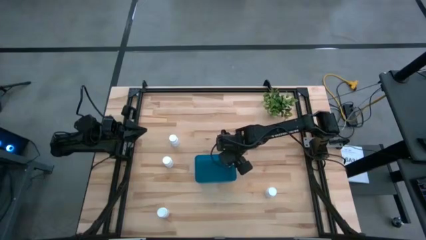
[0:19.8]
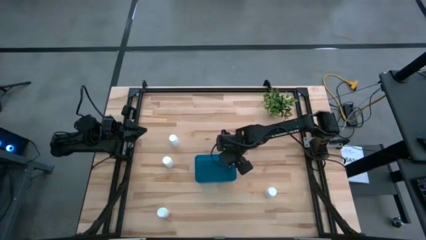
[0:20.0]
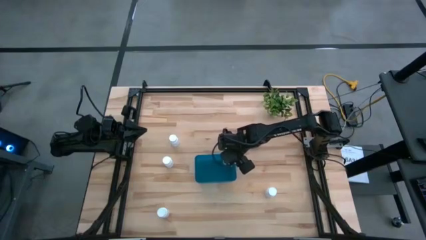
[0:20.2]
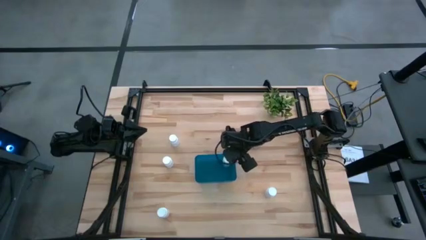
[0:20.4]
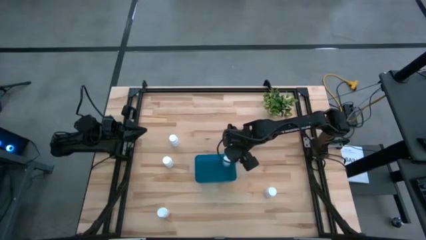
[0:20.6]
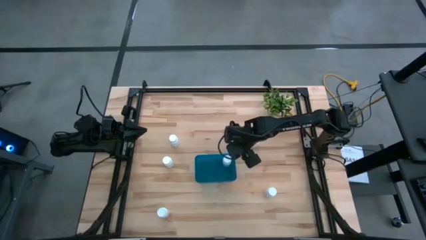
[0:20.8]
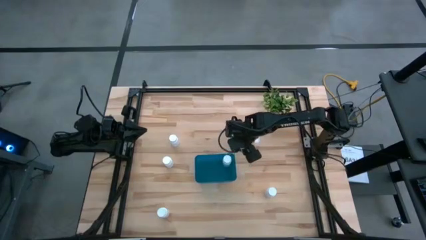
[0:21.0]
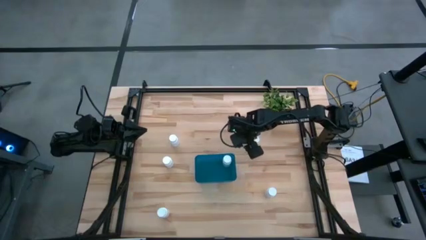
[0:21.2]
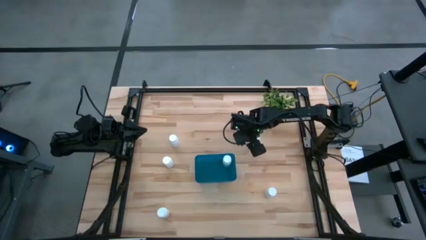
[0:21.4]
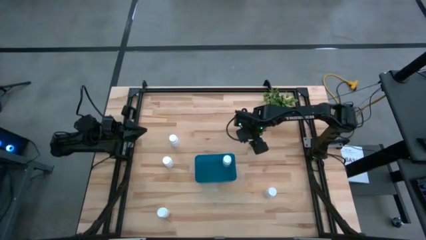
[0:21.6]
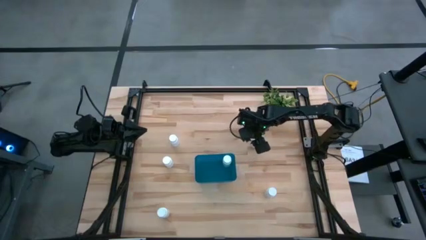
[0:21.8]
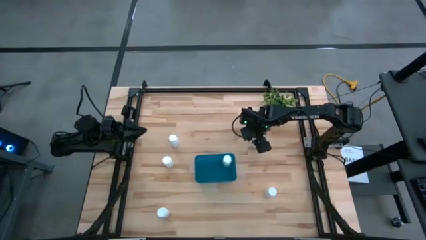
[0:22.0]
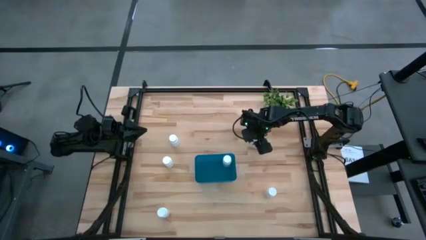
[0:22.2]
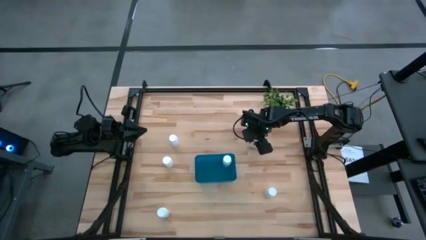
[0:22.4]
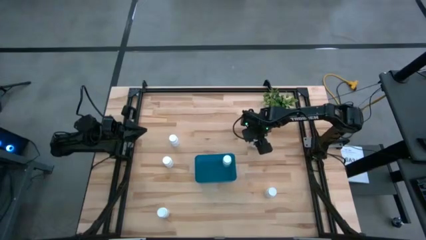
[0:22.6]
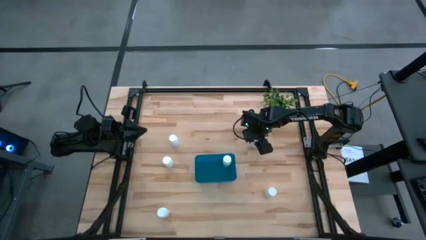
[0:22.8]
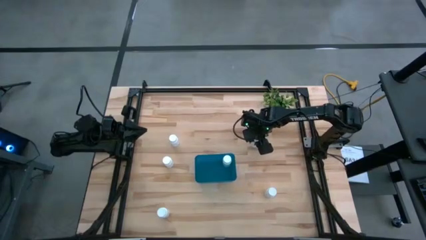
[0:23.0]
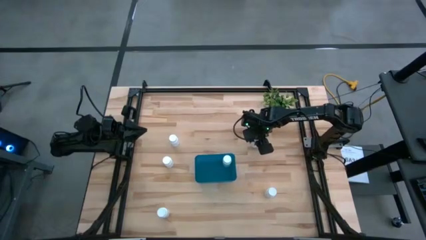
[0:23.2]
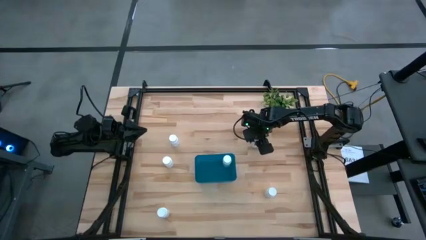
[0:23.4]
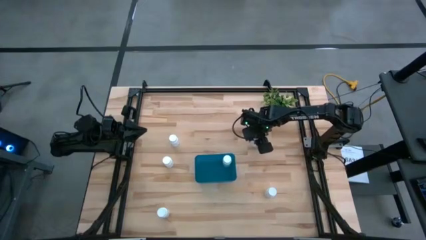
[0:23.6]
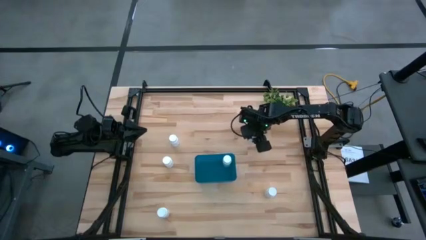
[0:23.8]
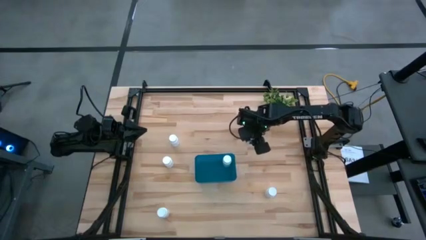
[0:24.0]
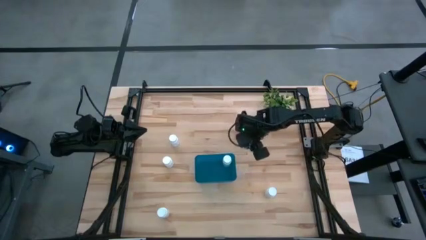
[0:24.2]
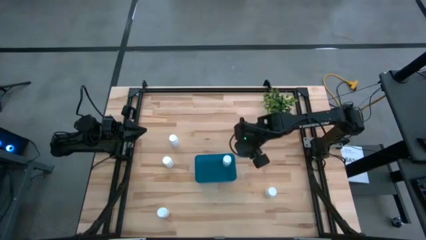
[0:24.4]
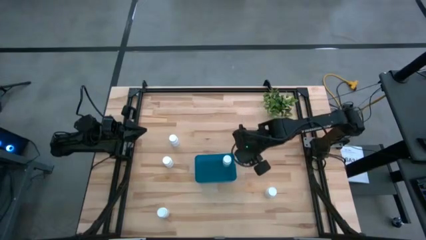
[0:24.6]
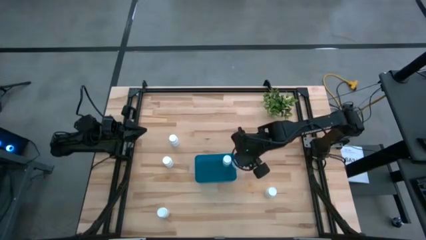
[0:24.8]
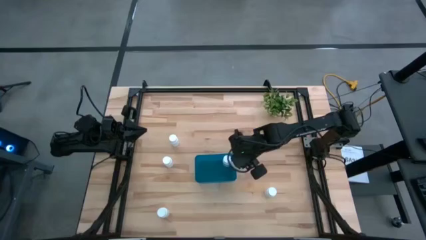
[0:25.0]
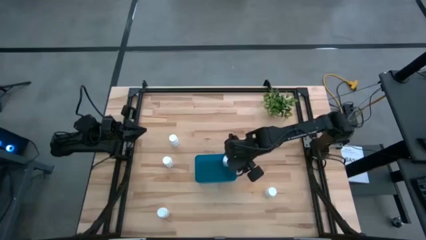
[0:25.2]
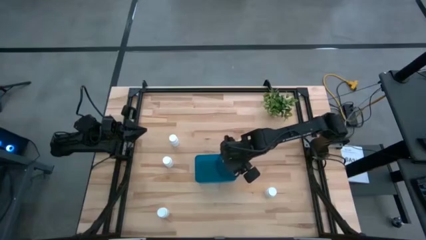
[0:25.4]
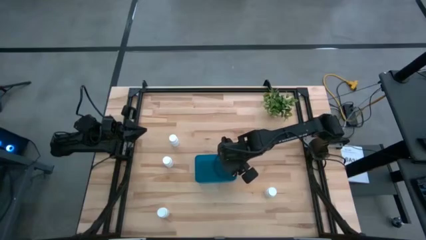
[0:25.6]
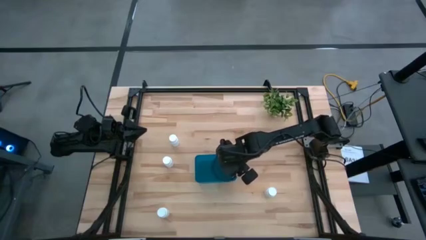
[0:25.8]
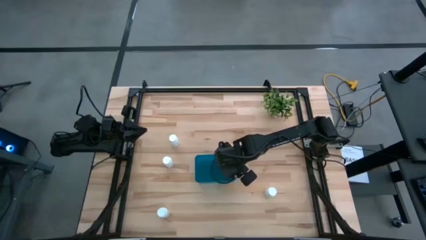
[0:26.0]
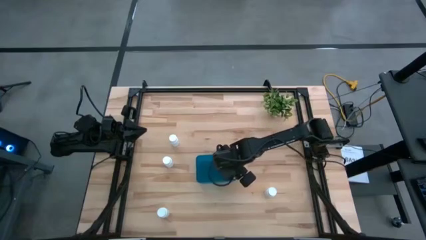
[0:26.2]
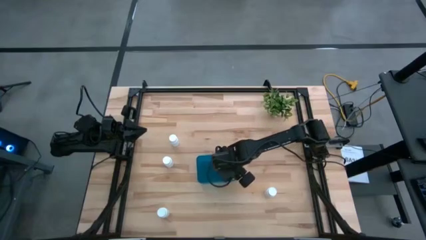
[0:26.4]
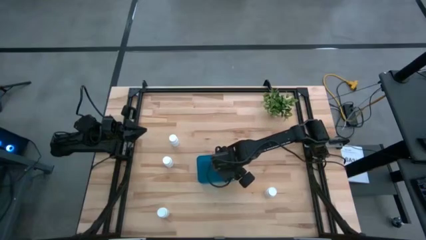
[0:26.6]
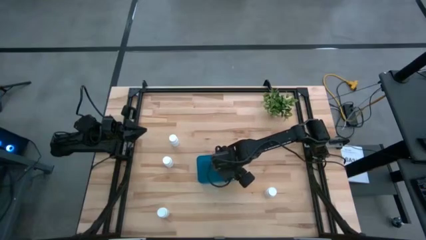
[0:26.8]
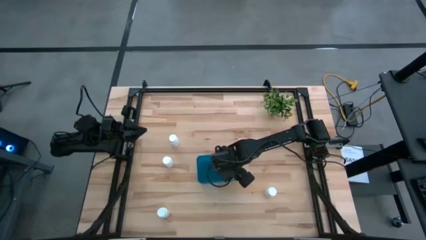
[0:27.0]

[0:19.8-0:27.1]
Task: Pick and place pill bottles into a basket
Put the medicine bottle into the blue bin

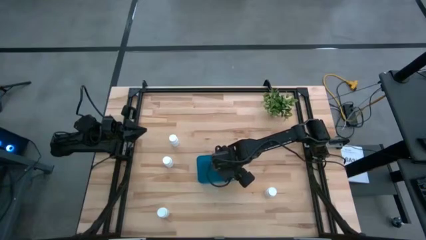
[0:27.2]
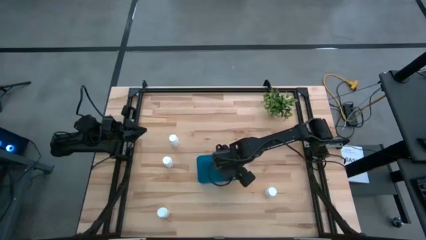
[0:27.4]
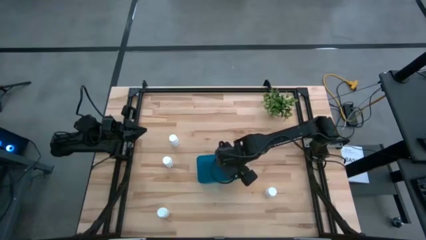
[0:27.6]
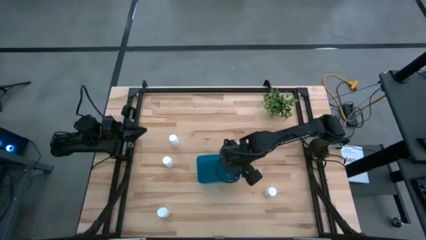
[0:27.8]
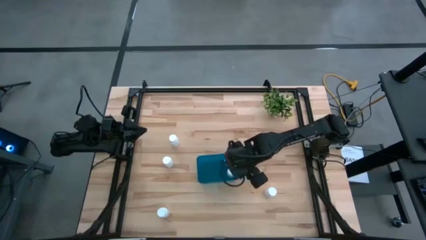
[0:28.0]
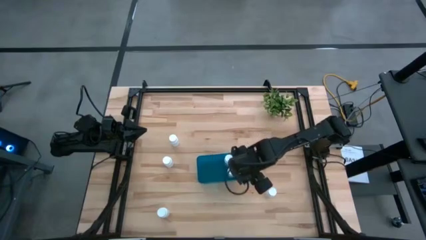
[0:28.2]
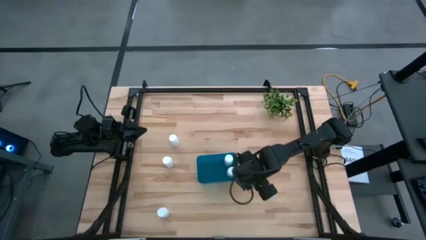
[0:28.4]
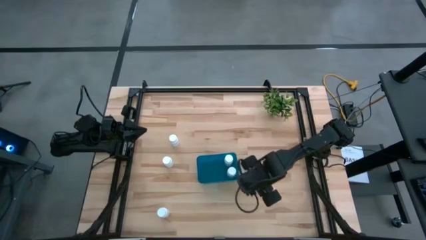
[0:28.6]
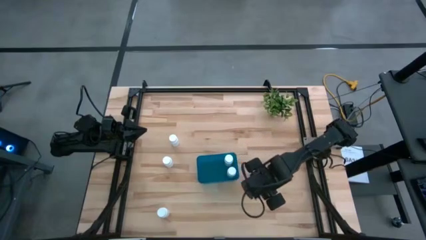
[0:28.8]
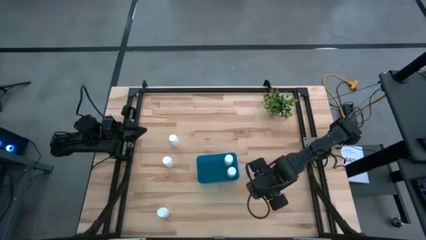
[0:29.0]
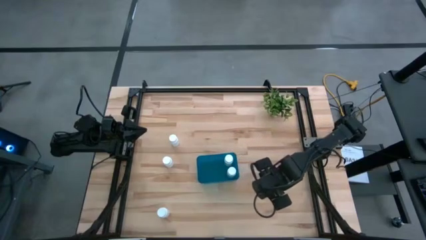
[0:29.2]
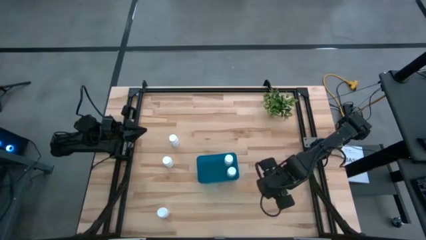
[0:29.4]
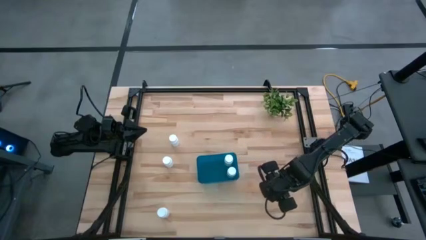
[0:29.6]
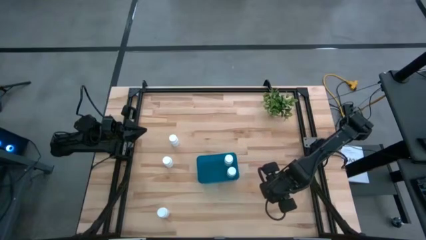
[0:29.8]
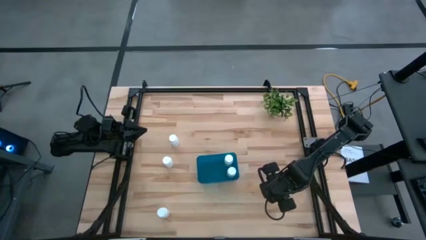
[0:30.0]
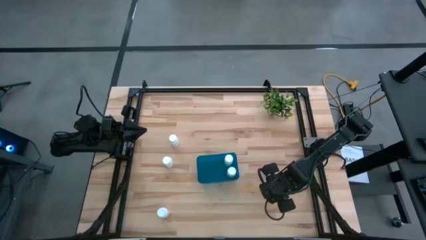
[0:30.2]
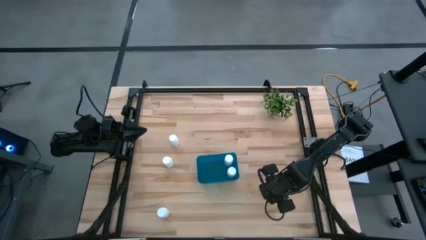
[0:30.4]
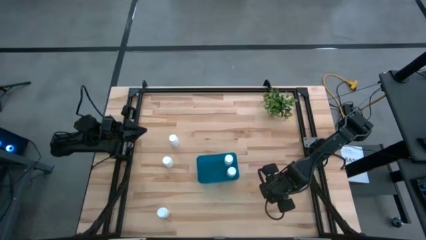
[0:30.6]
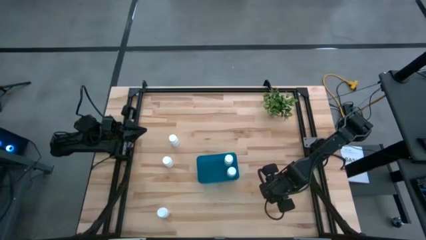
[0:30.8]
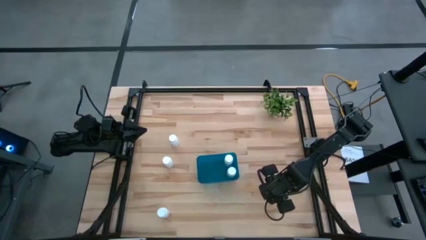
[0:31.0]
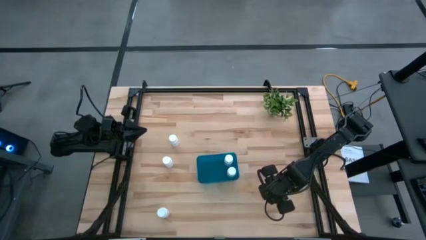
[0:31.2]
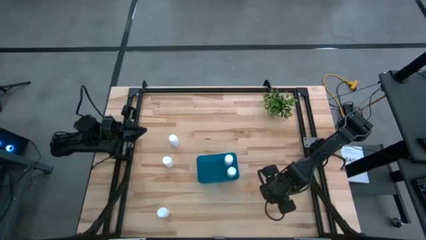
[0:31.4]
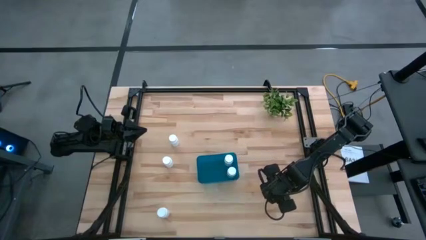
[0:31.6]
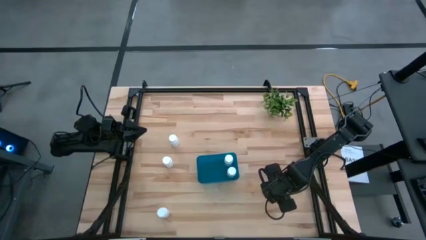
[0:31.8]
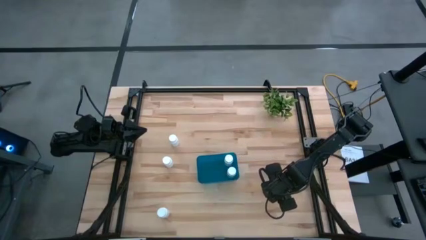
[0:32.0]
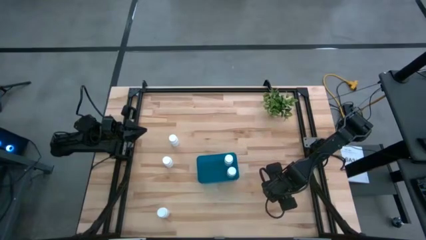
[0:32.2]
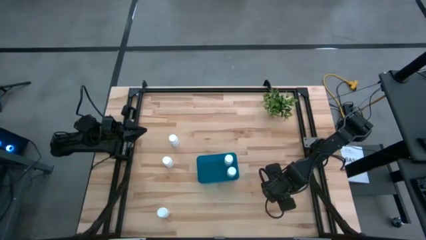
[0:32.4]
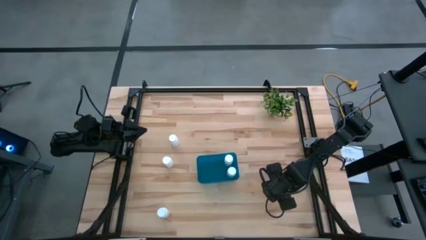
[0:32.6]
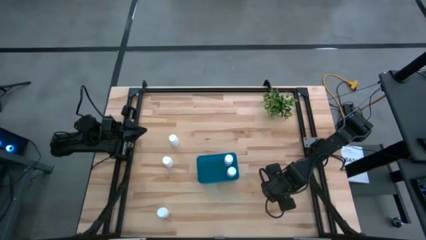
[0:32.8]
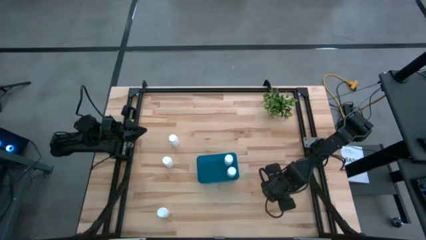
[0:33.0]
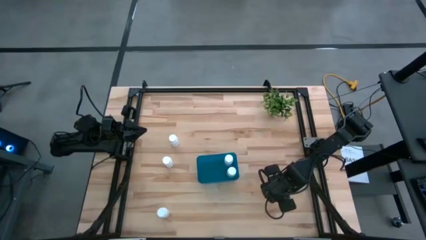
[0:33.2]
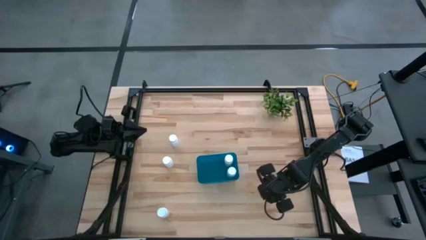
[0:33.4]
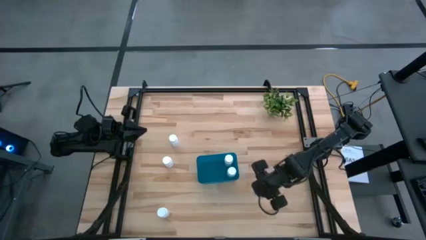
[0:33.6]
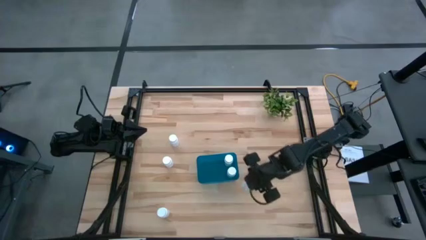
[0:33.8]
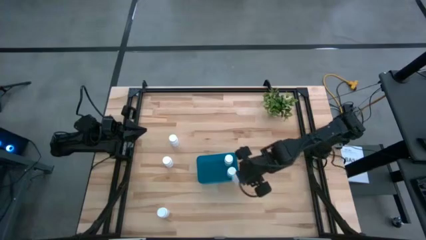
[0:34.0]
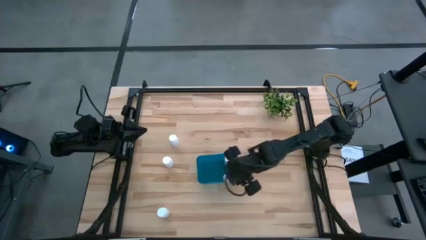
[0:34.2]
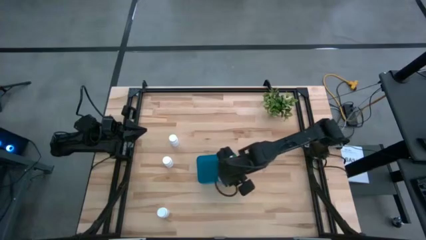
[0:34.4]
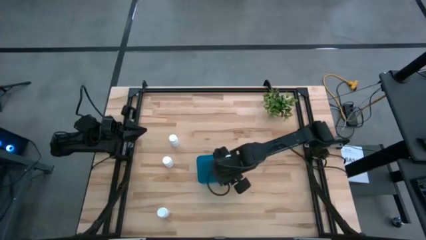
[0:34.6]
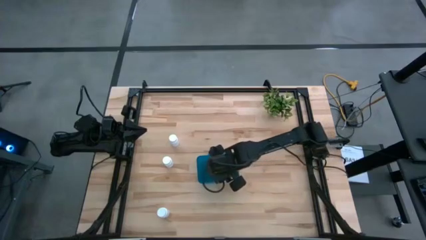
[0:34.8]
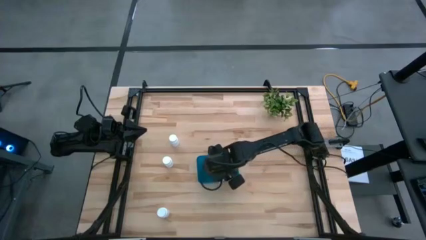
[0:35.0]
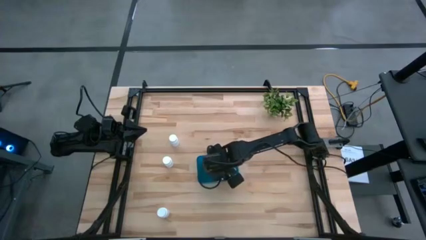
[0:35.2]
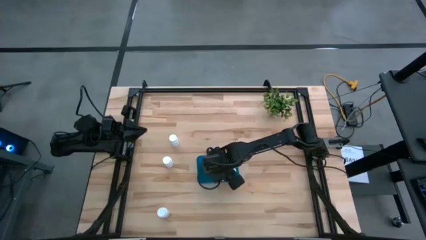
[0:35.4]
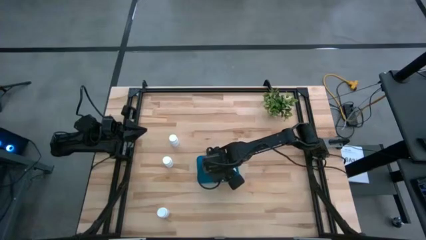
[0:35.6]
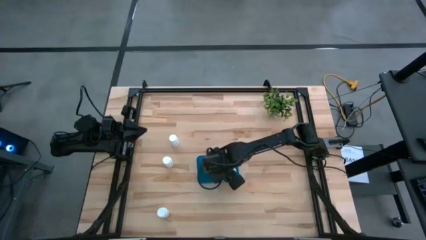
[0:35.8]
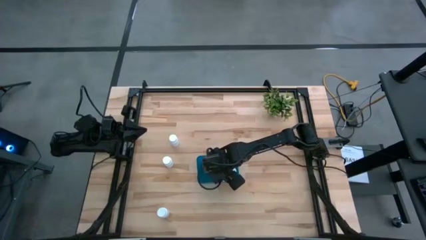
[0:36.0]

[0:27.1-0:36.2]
Put the medicine bottle into the blue bin
